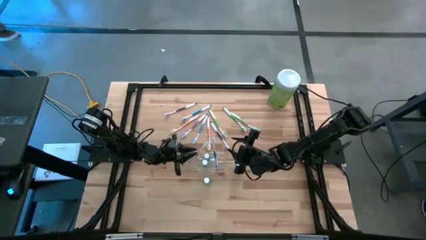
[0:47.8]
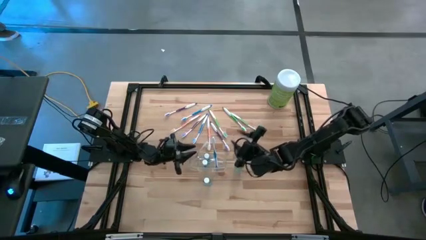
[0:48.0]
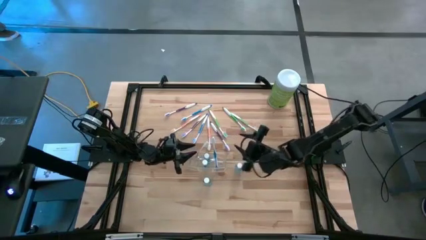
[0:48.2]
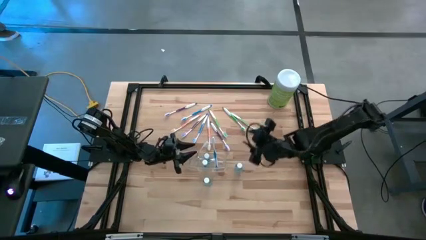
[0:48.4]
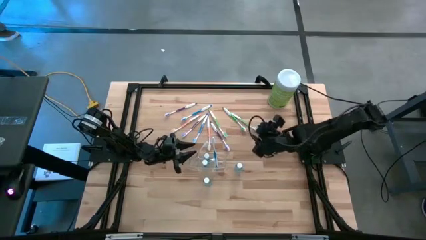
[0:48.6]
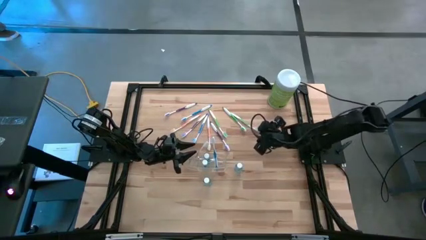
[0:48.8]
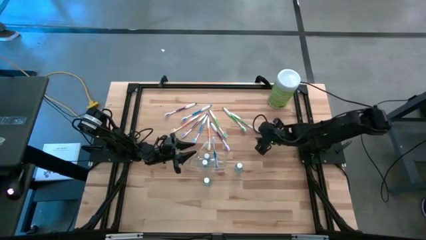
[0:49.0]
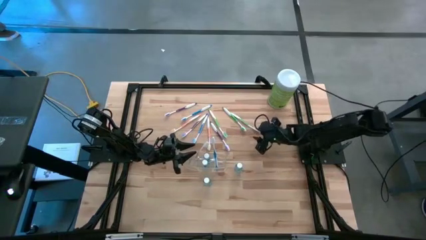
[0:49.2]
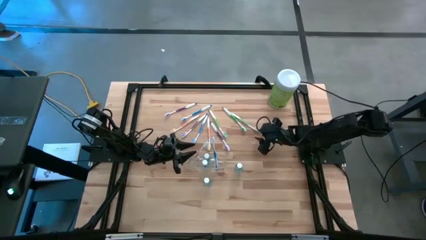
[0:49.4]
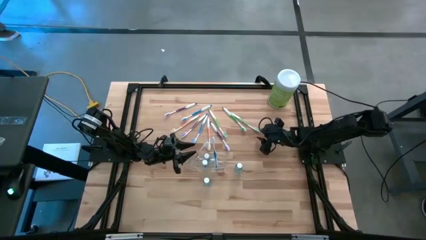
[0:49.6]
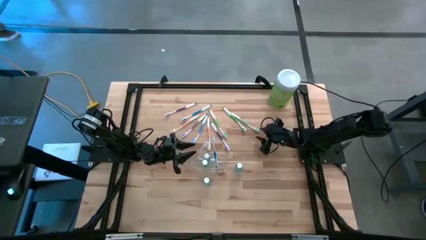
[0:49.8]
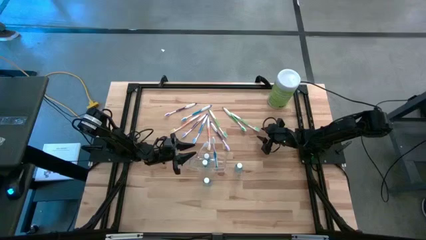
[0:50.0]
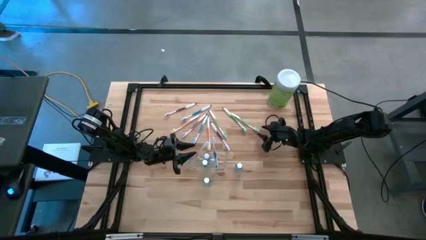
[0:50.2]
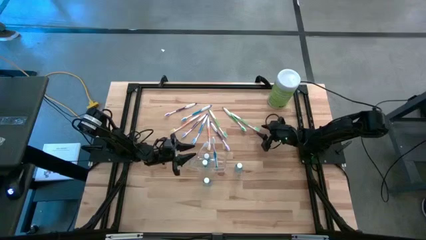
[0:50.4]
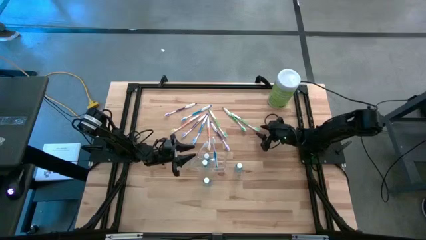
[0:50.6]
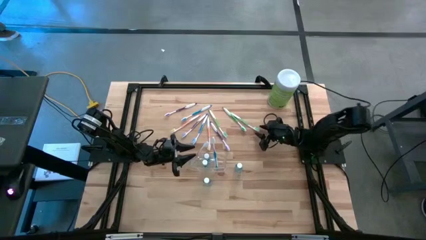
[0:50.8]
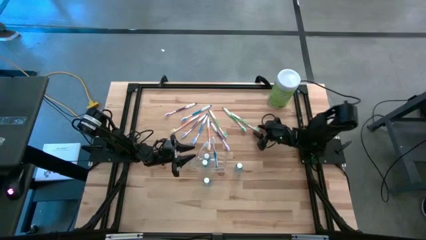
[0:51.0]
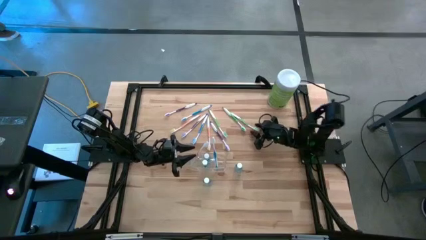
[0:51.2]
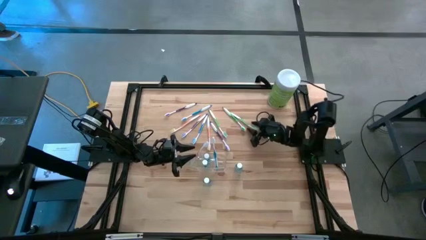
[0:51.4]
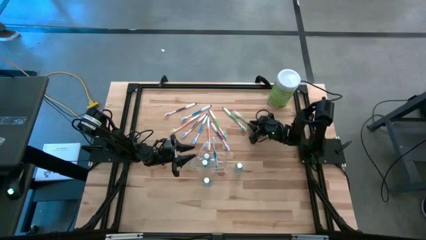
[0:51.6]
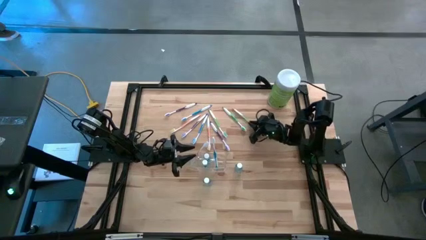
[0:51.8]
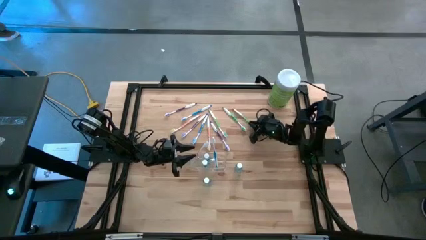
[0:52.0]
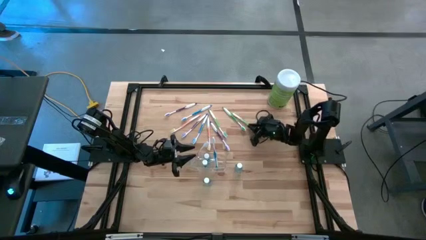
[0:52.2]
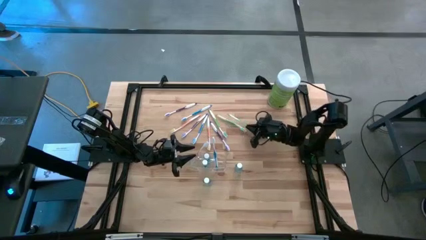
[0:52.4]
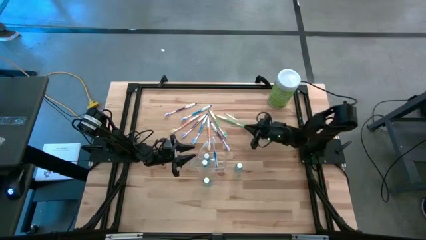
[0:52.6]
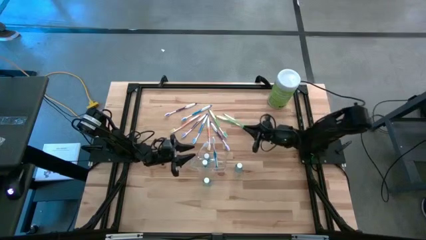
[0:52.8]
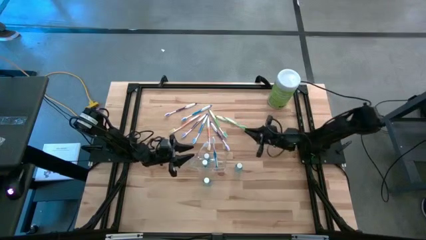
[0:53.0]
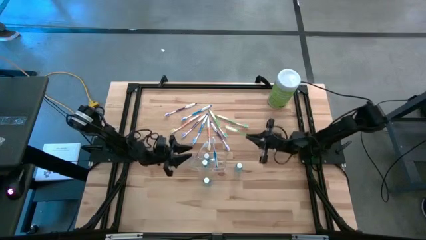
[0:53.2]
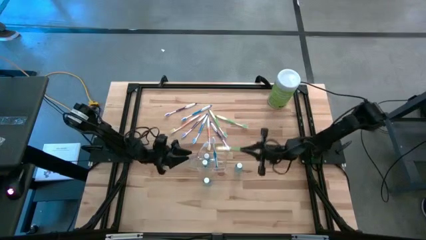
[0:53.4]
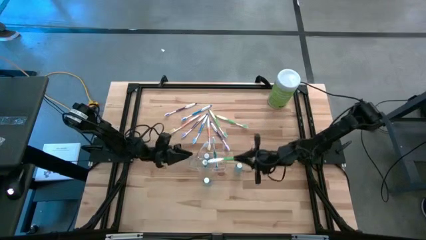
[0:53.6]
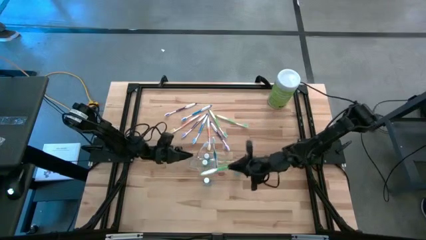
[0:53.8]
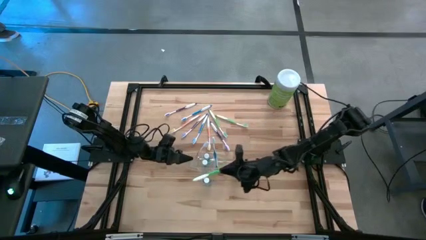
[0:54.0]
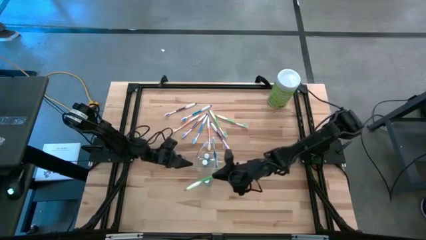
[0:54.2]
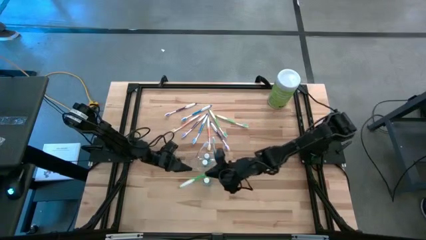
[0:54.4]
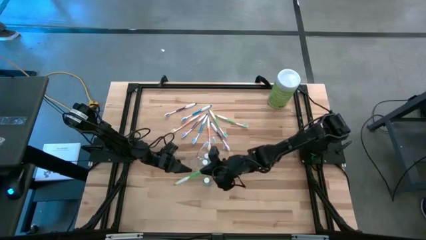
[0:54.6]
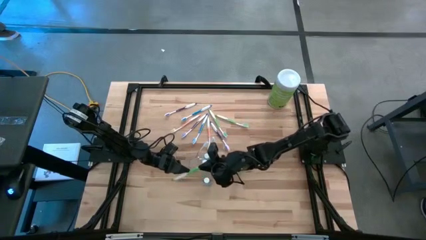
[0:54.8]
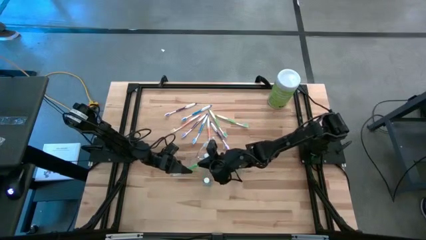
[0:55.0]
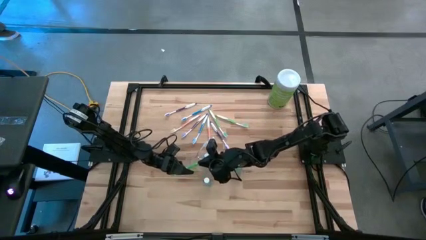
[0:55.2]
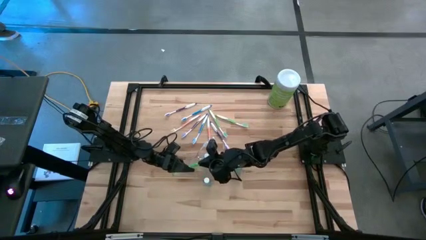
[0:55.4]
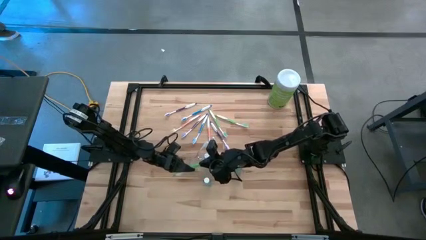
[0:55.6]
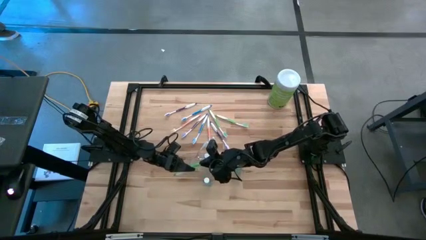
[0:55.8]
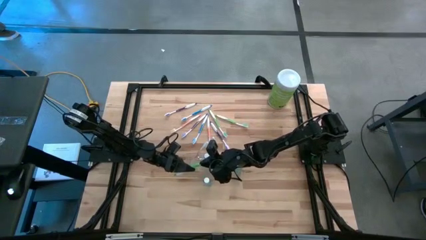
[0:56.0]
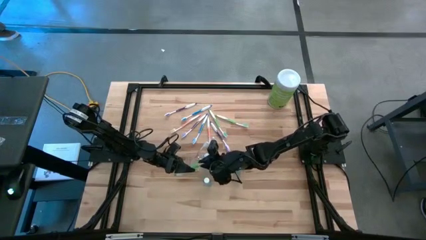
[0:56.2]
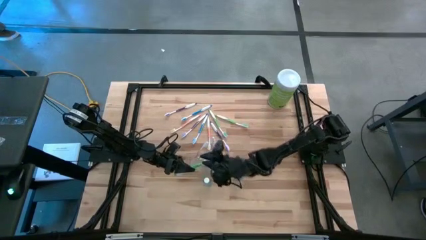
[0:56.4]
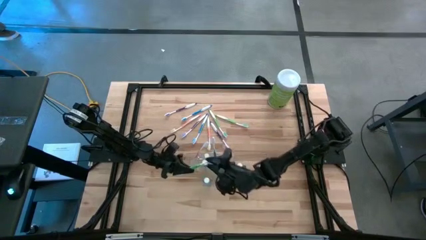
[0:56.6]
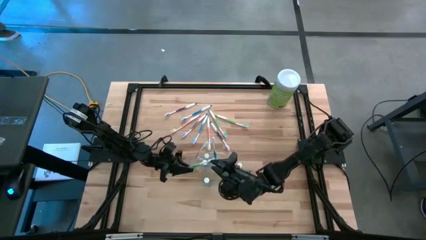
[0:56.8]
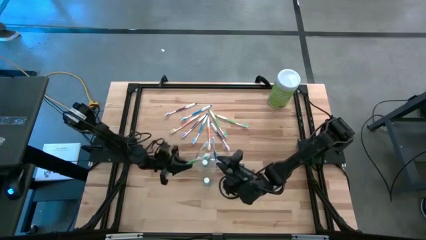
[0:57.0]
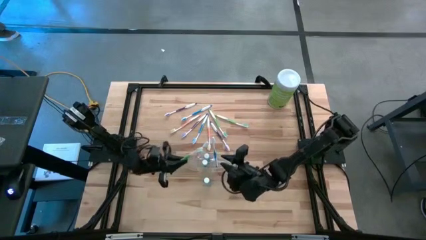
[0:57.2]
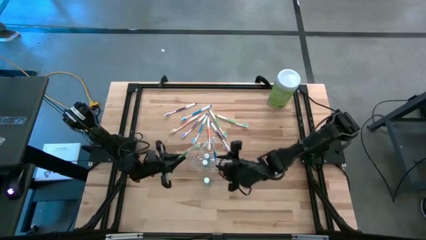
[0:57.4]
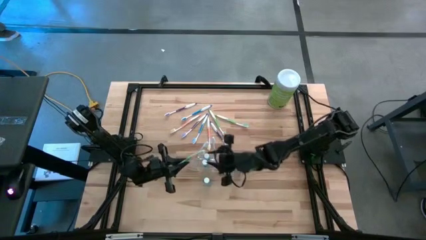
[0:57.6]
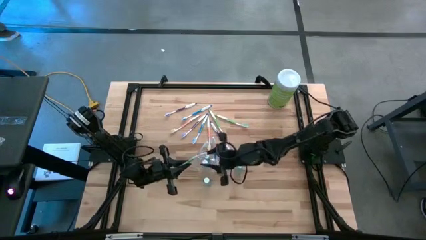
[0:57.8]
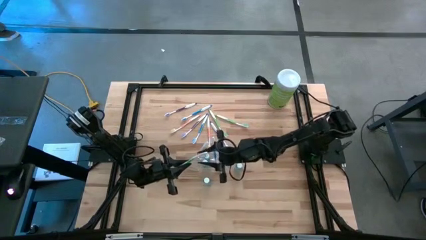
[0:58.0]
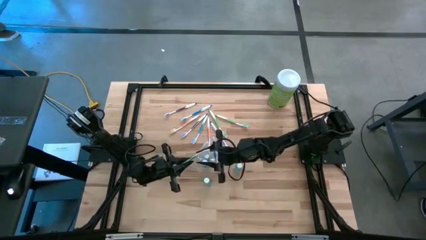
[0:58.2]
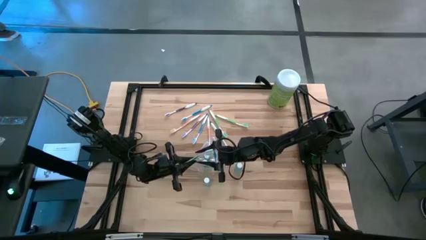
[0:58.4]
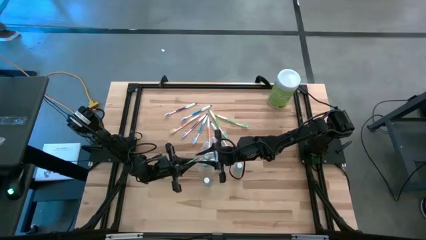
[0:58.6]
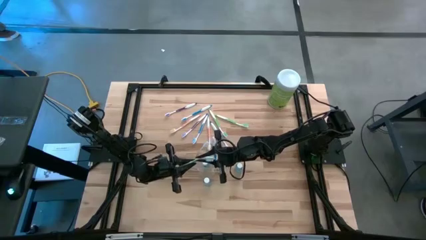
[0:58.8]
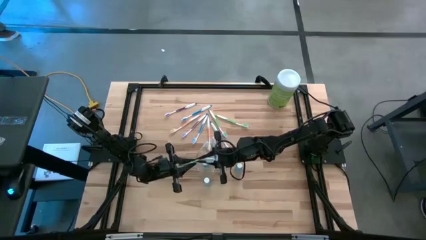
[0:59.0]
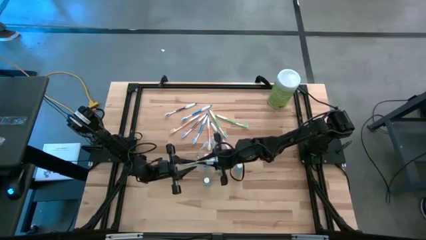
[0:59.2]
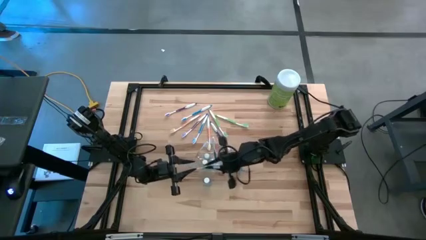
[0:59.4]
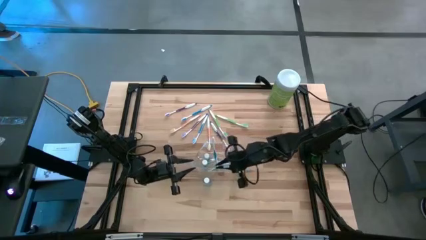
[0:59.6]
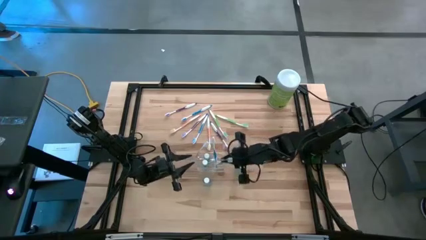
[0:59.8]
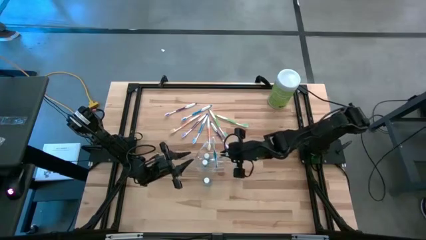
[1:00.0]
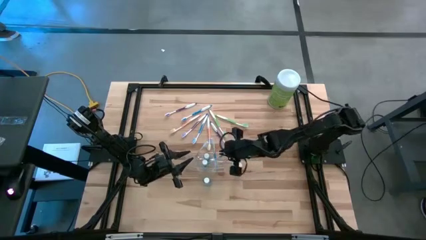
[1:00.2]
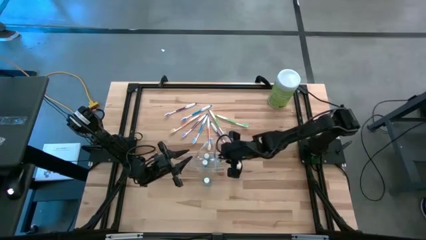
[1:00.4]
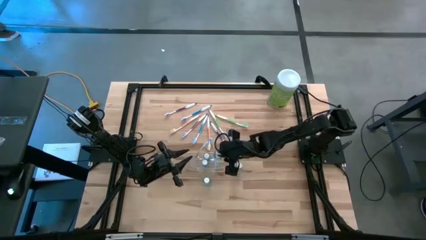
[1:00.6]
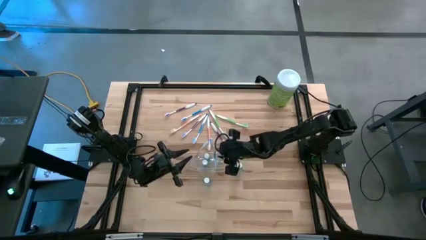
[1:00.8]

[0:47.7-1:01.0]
Task: Pick & Place toothbrushing station
Put the green toothbrush into the transparent organizer
